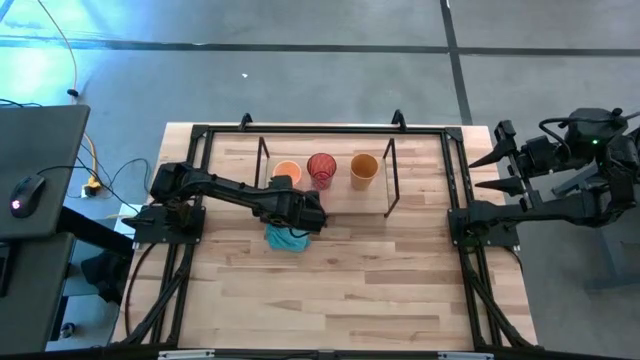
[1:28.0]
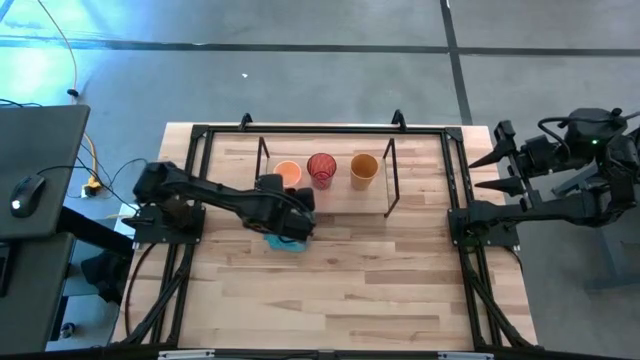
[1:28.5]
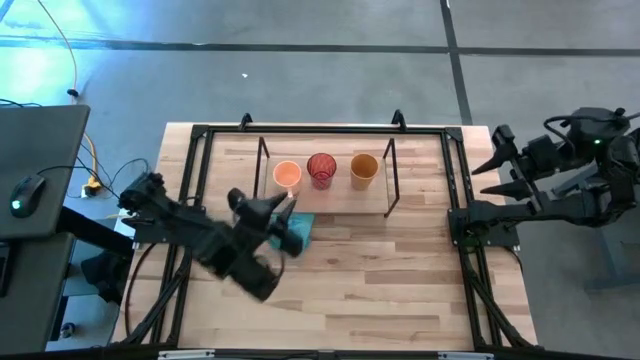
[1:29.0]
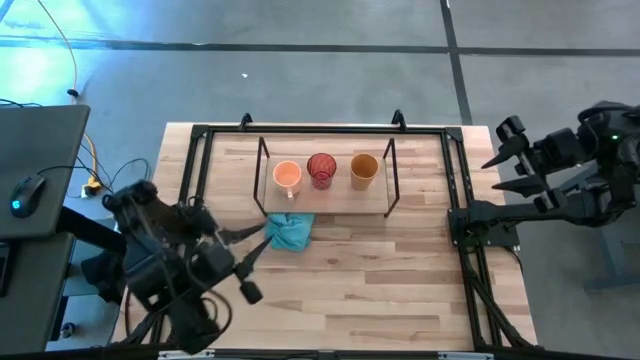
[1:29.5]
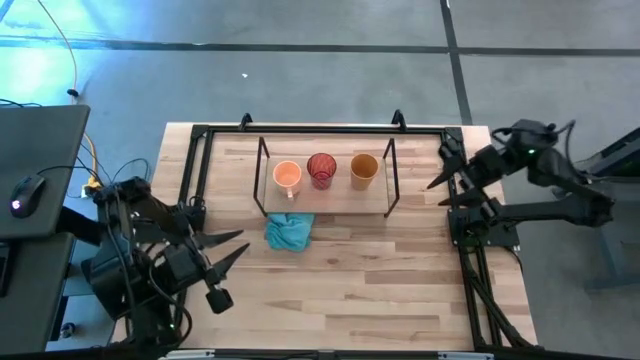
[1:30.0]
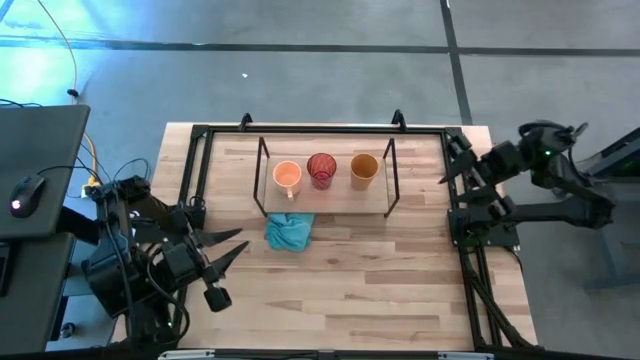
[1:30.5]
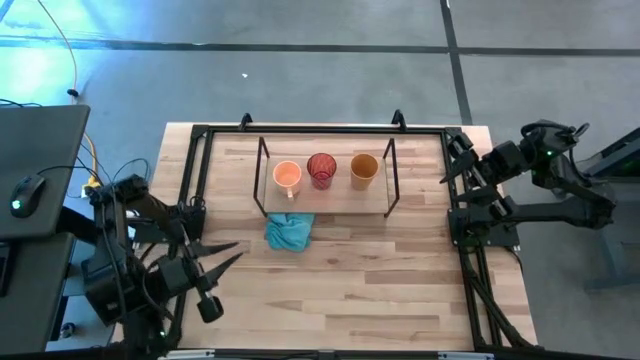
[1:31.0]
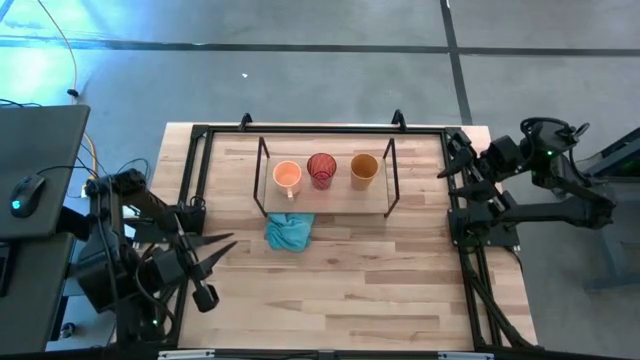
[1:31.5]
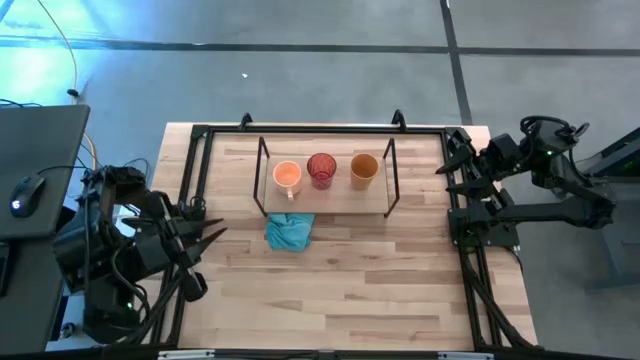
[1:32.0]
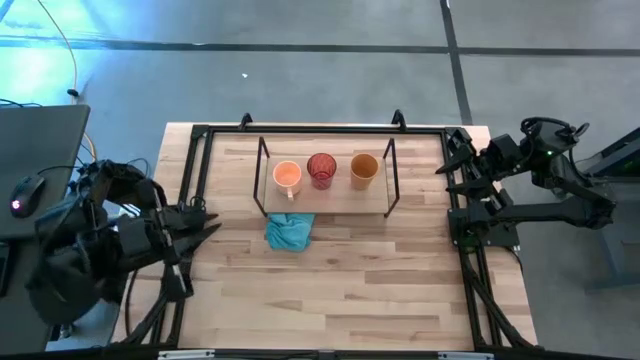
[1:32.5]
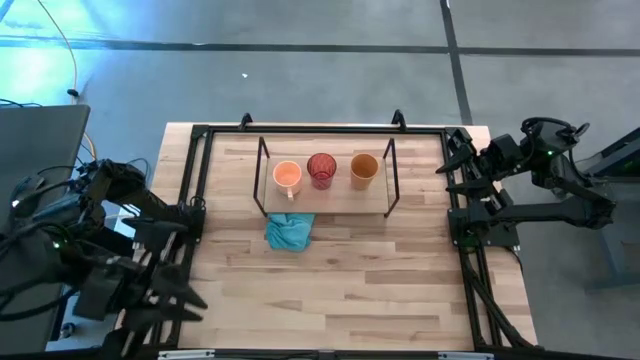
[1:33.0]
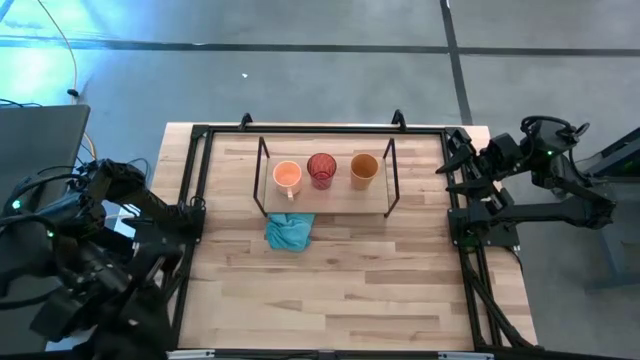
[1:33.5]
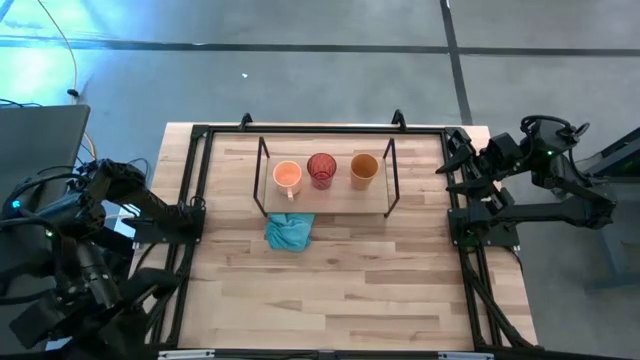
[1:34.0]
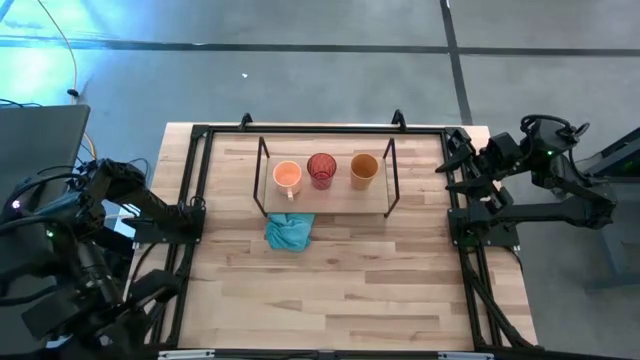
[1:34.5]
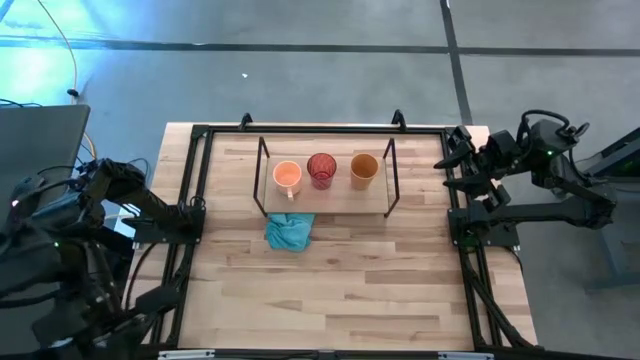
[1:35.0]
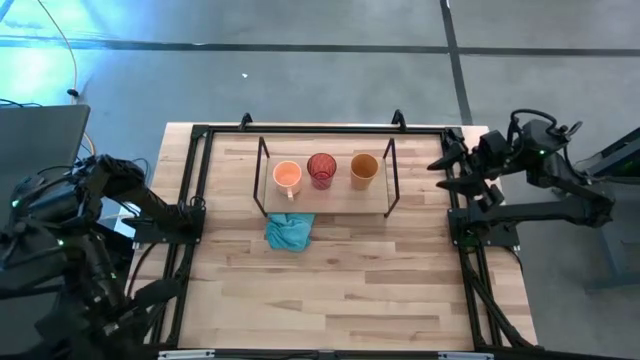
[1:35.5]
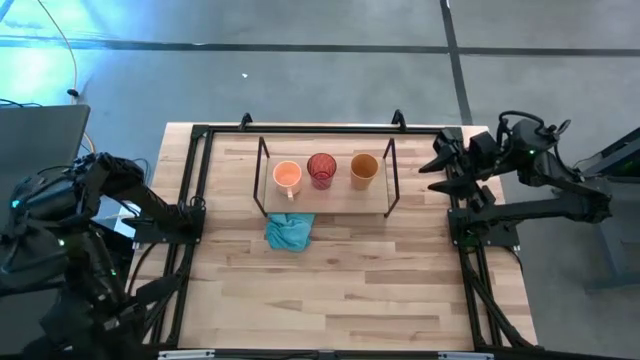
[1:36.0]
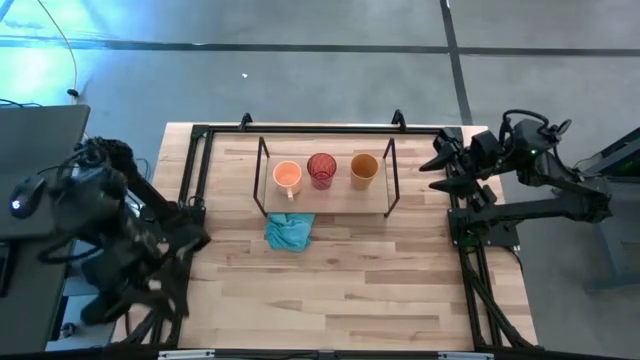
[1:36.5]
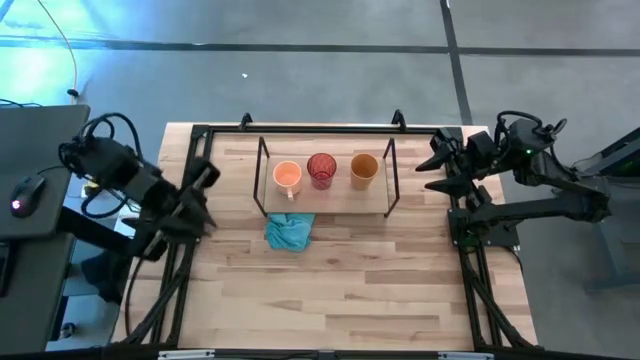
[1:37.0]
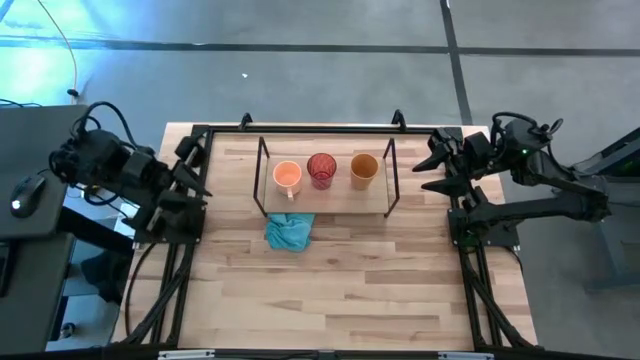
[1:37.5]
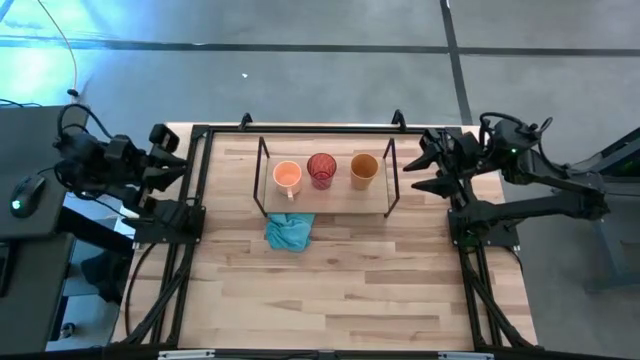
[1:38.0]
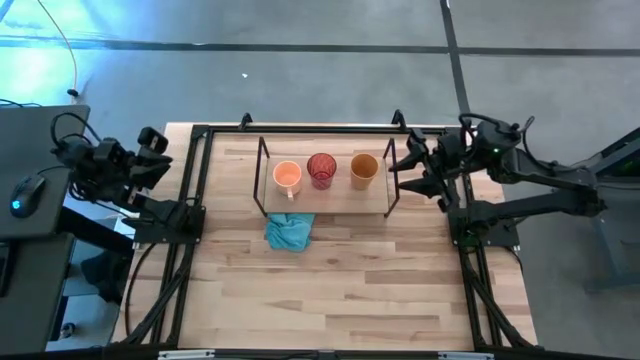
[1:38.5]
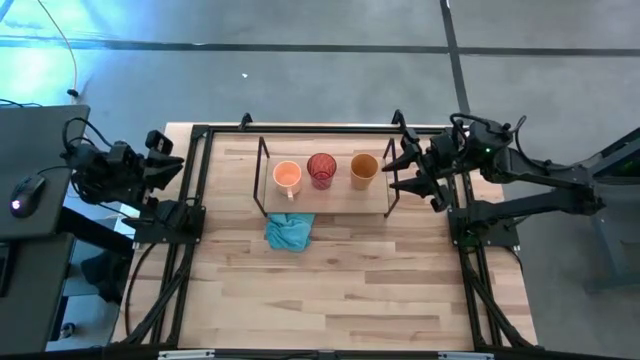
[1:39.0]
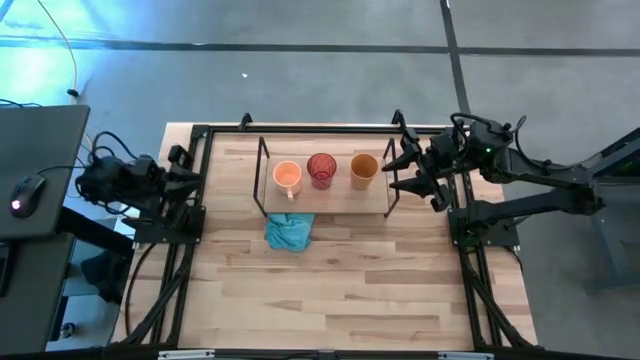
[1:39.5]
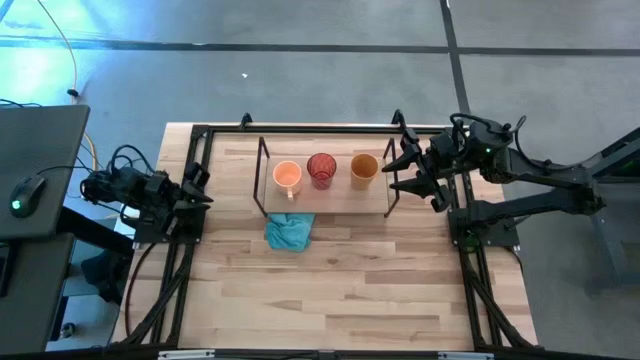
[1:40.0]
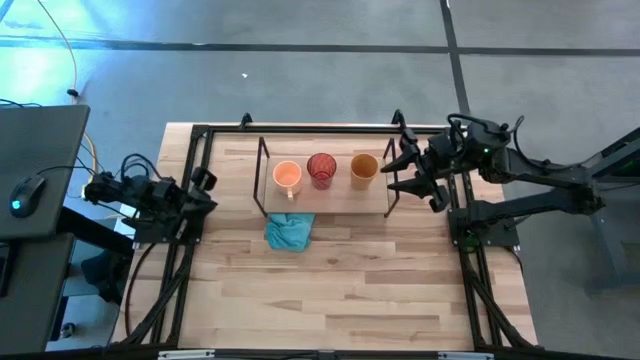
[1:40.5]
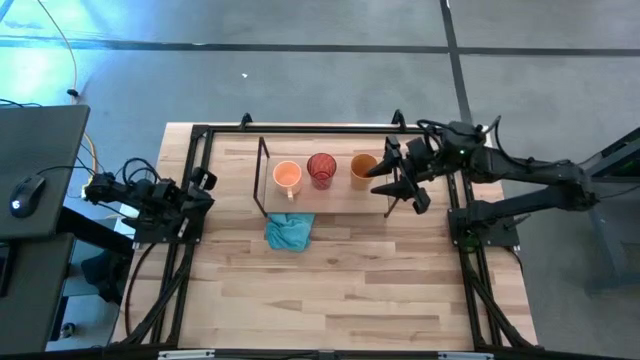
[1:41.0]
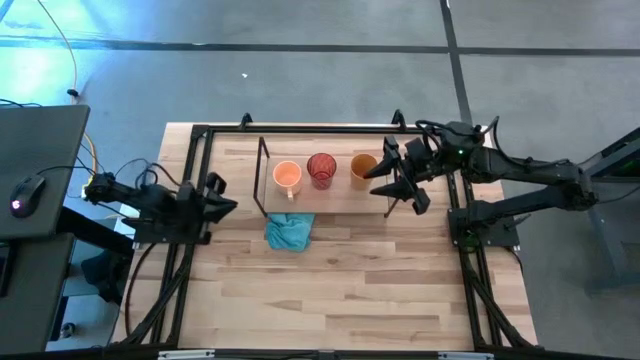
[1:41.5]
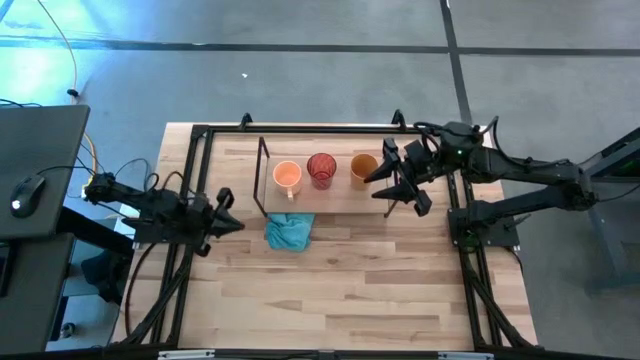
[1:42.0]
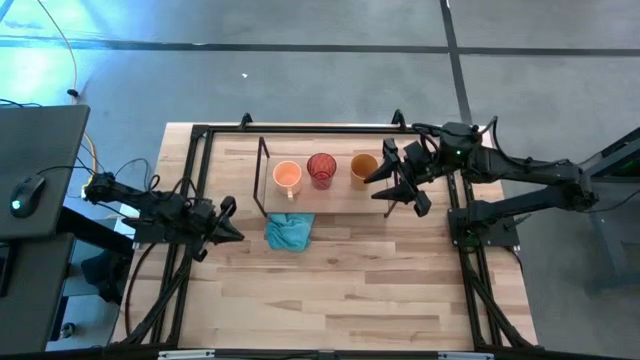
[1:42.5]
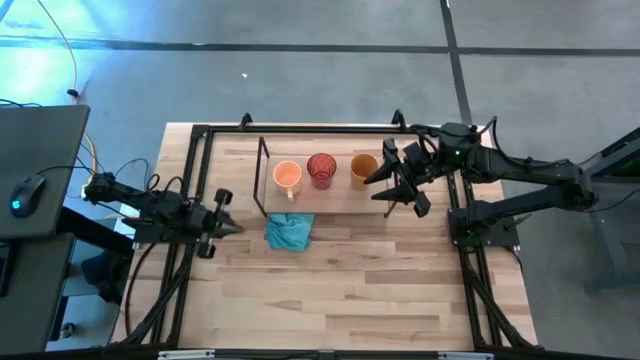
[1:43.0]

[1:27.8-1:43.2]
Task: Stack small to large cups/mugs on shelf
Return to Home Position

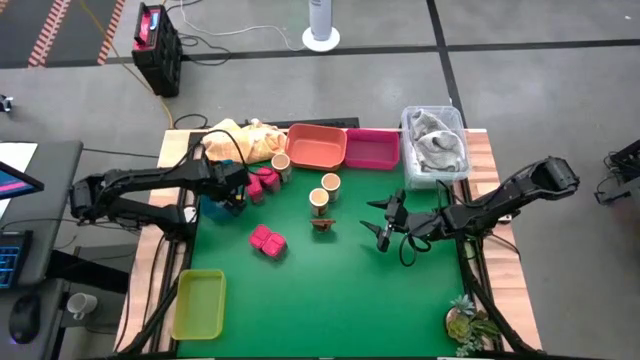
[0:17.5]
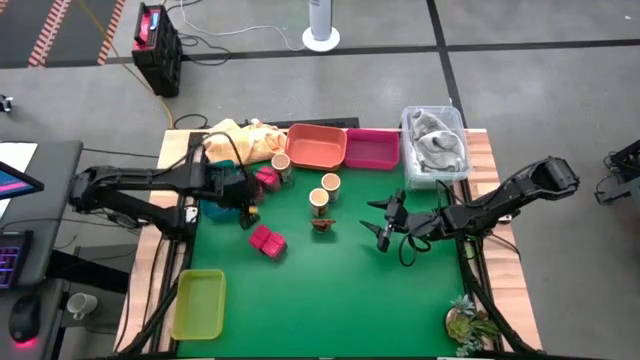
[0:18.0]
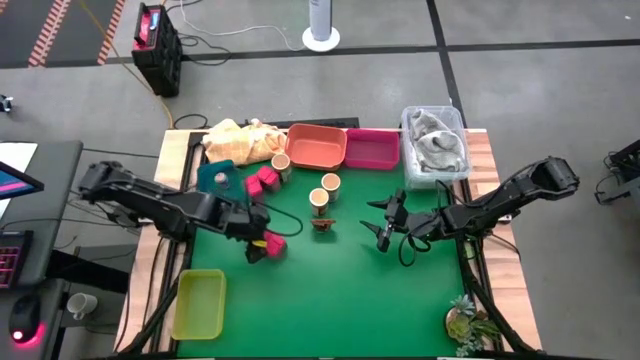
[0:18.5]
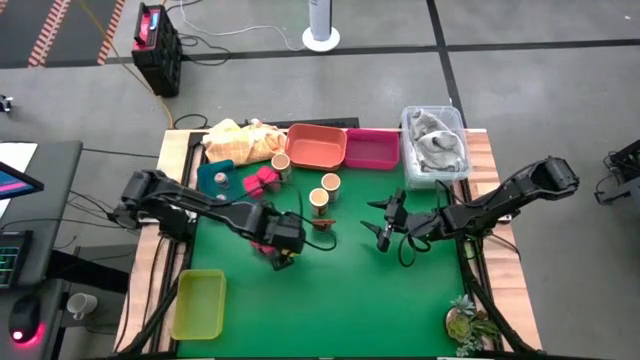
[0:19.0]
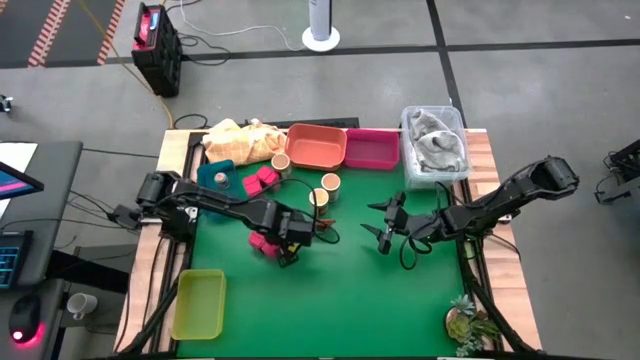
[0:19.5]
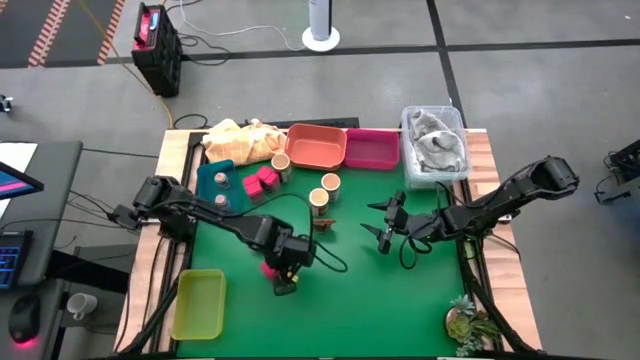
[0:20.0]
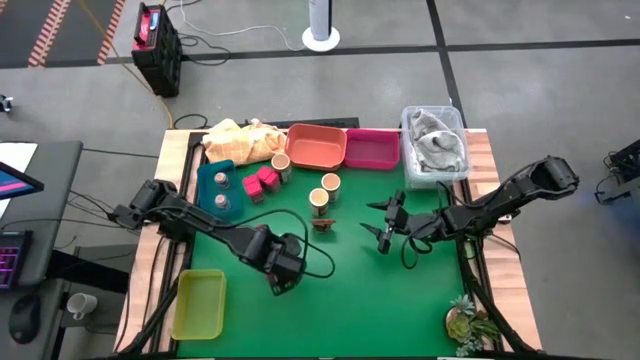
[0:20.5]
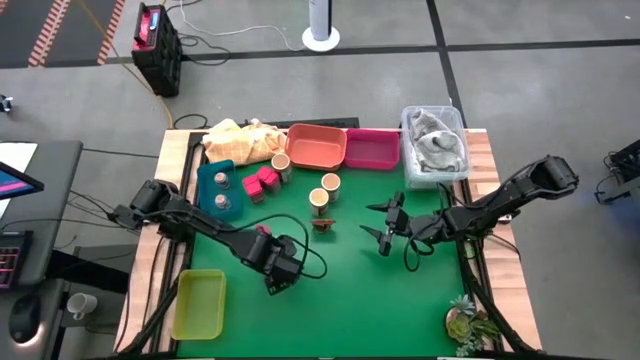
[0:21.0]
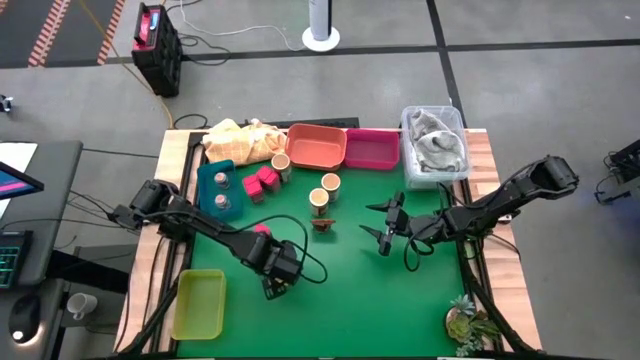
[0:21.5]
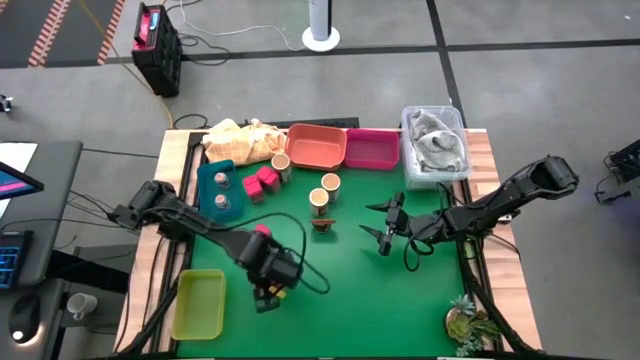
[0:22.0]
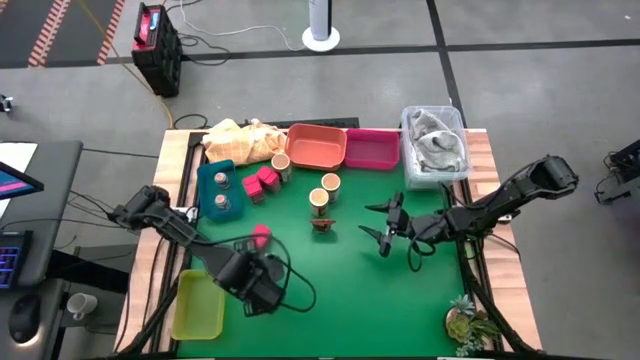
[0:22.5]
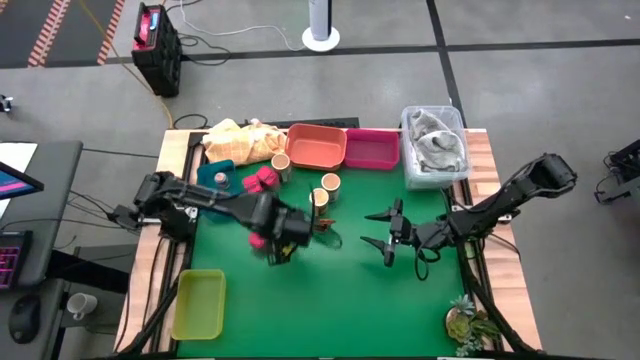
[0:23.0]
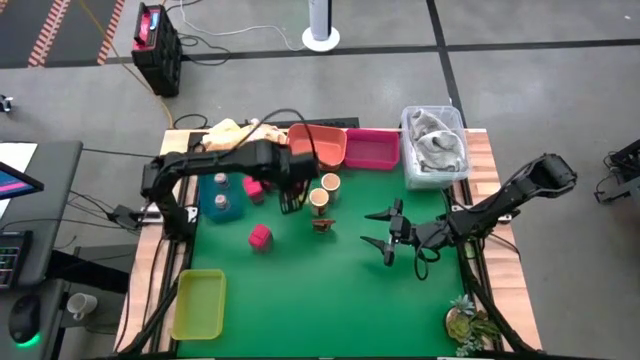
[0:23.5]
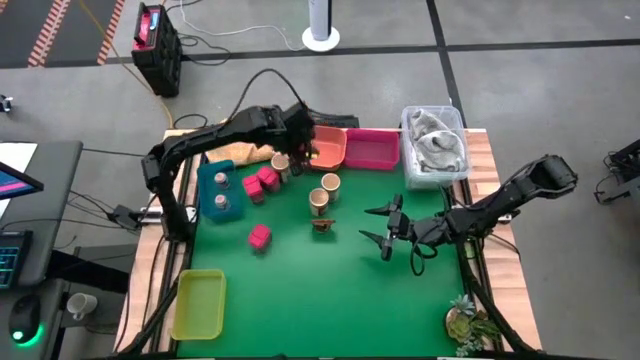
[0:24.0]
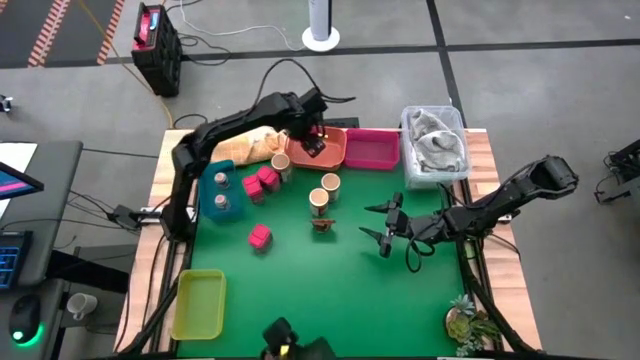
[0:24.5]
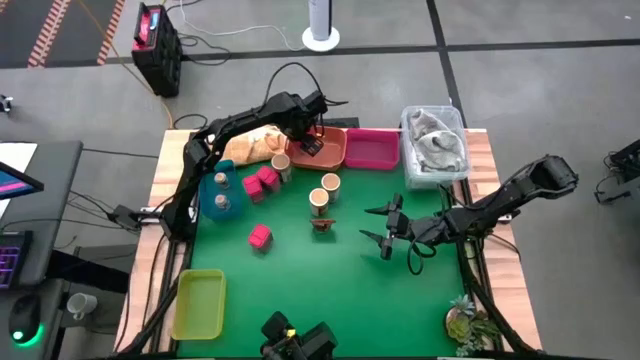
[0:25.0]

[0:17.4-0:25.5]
Task: Sort spices by type
Put the bottom right red seasoning can into the orange bin
